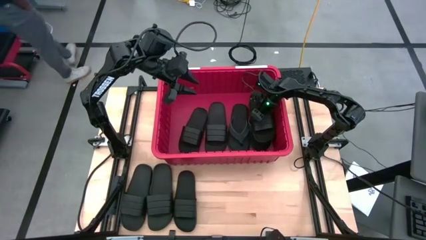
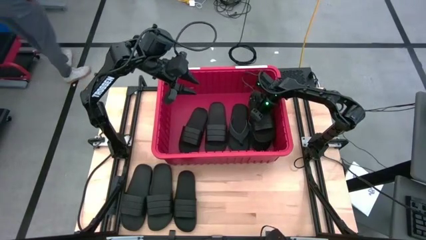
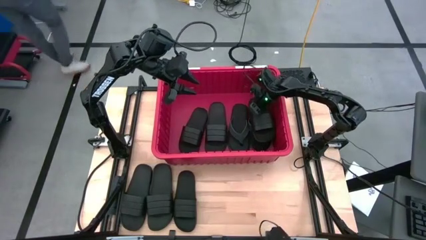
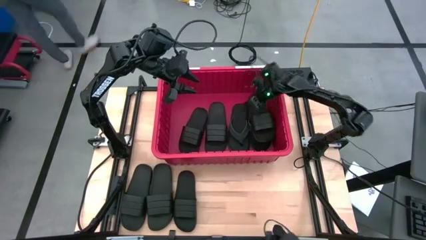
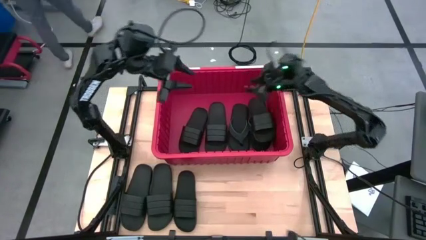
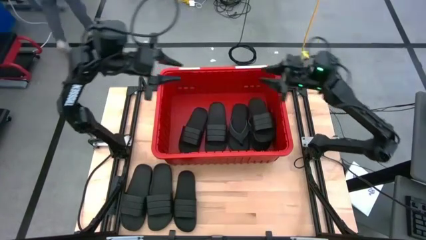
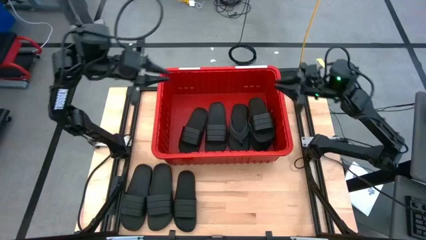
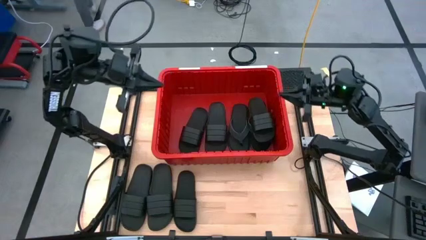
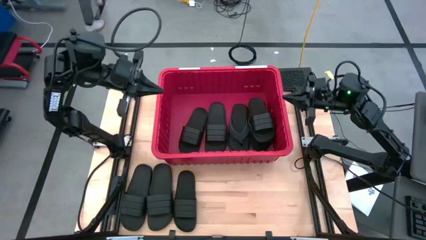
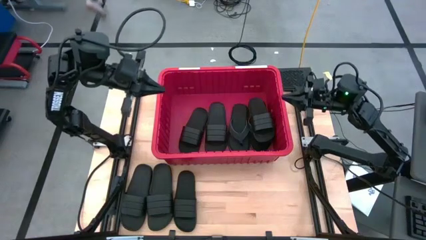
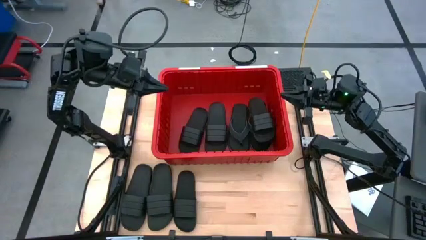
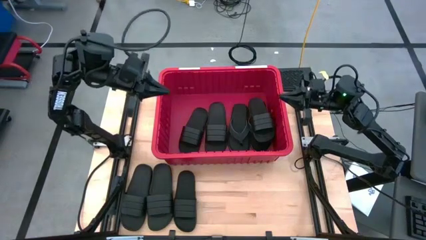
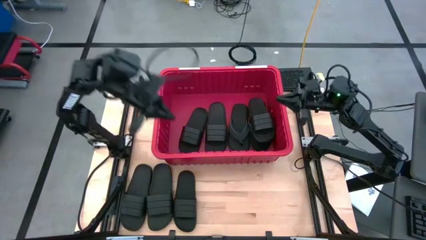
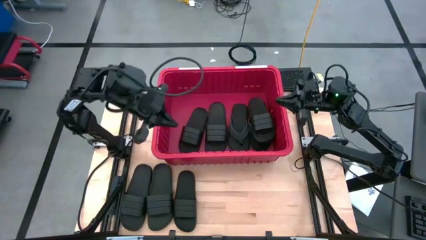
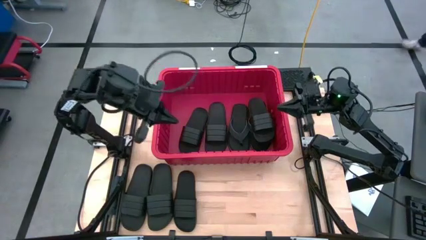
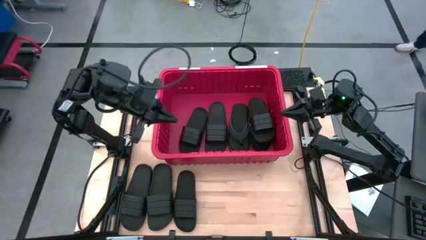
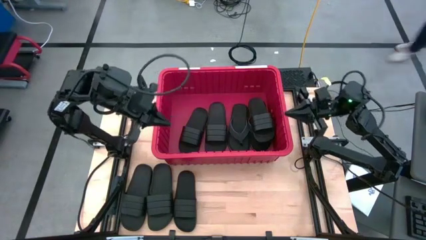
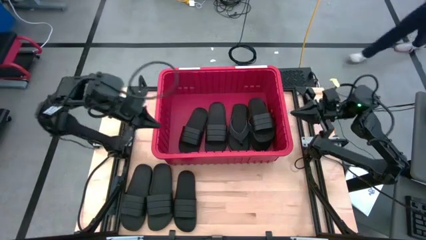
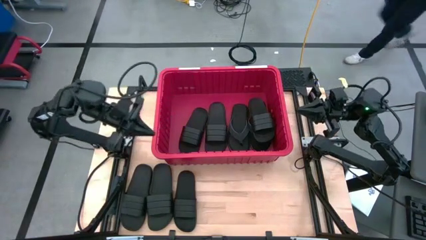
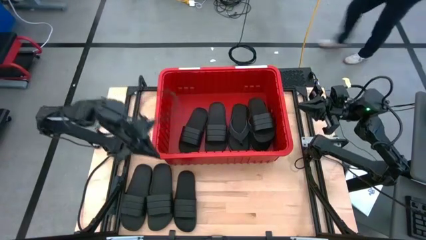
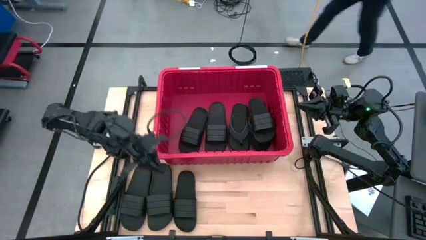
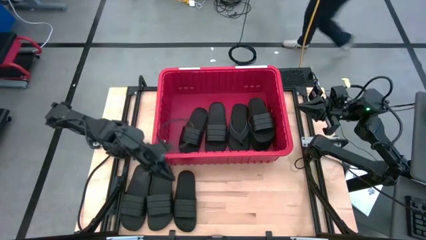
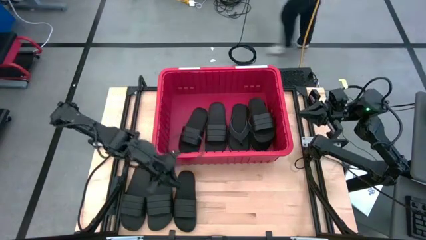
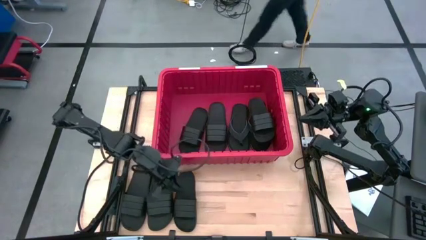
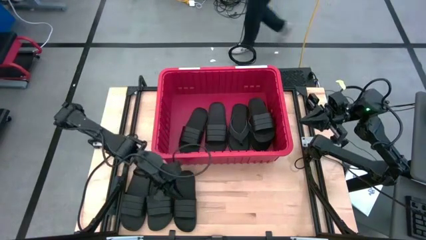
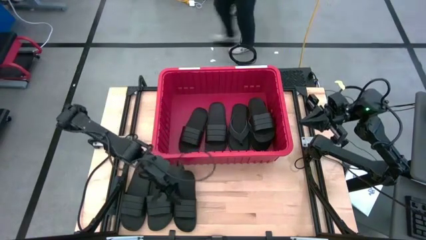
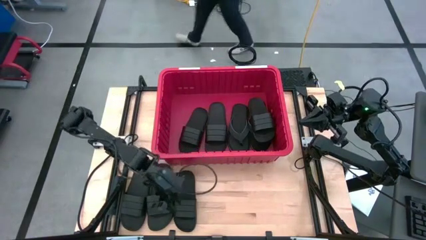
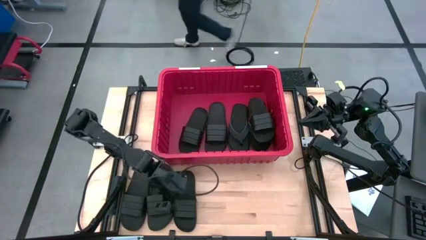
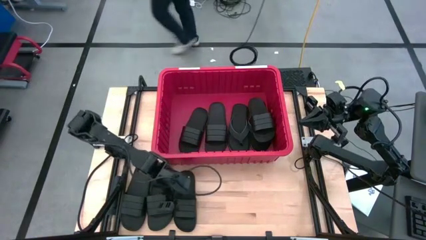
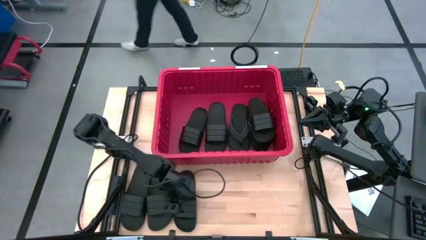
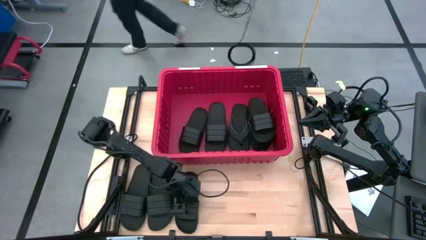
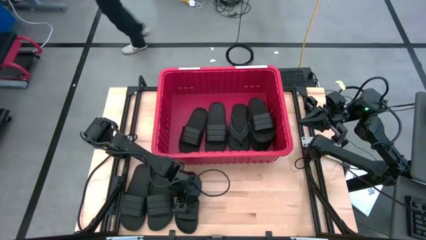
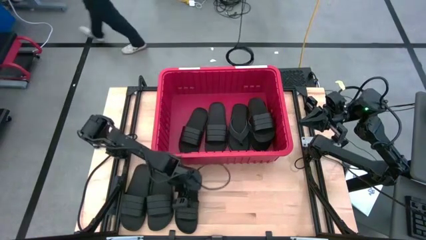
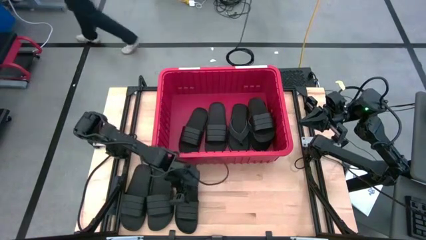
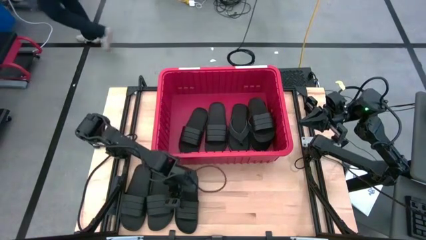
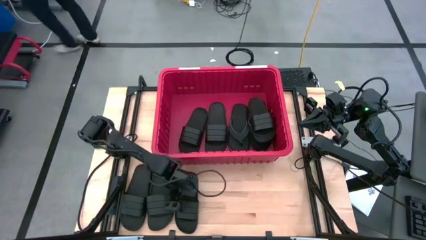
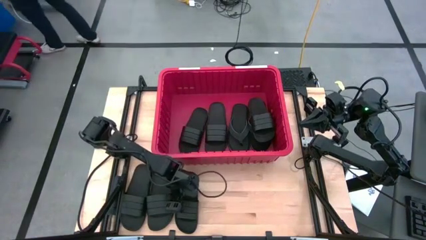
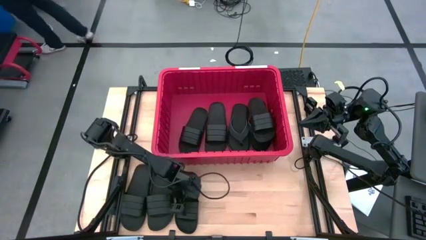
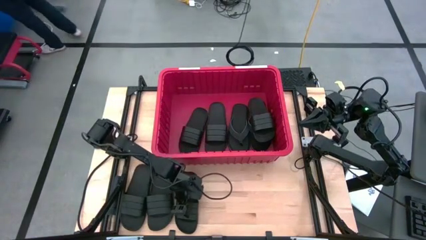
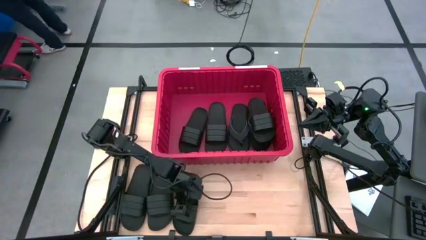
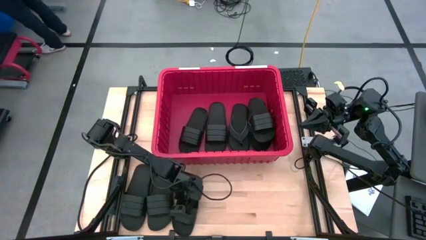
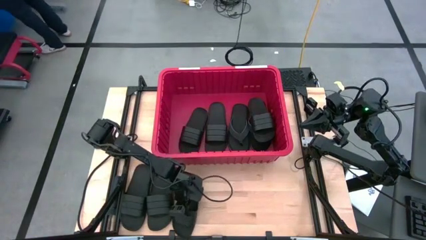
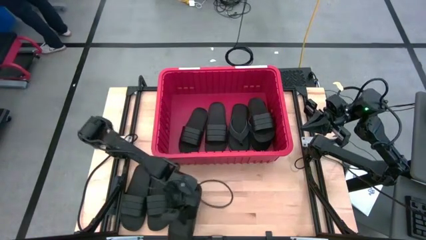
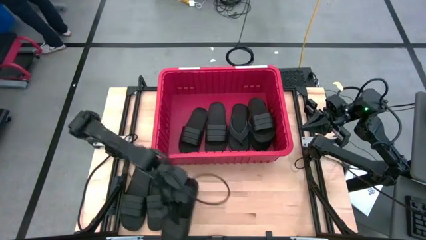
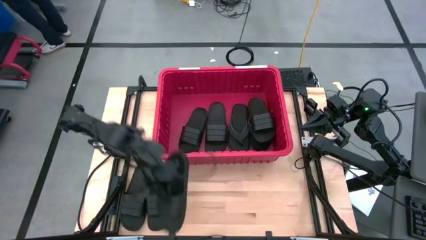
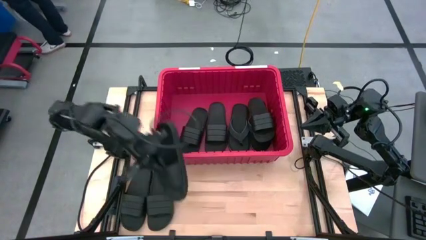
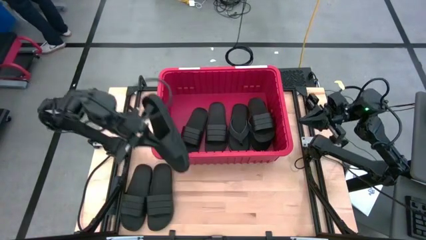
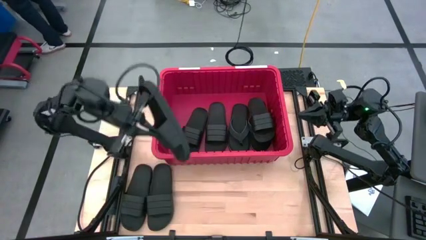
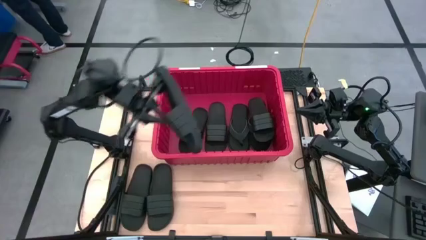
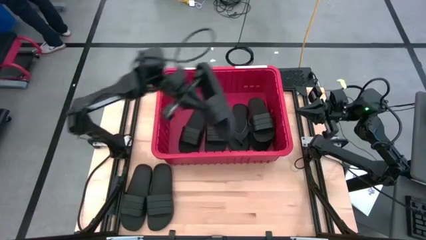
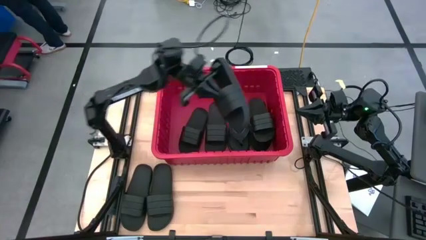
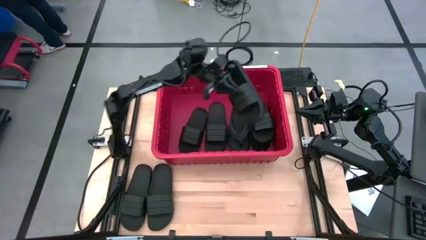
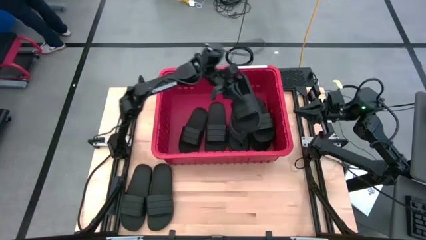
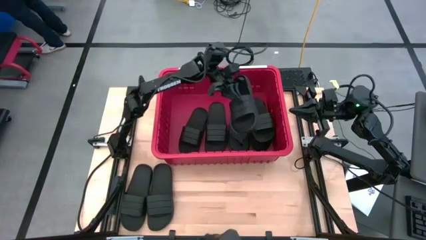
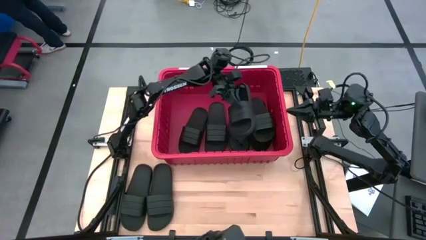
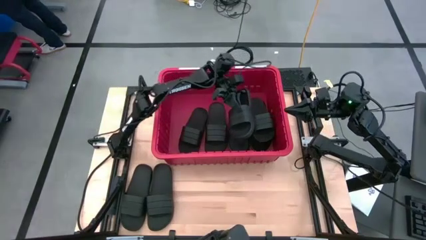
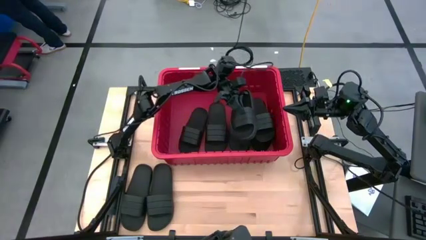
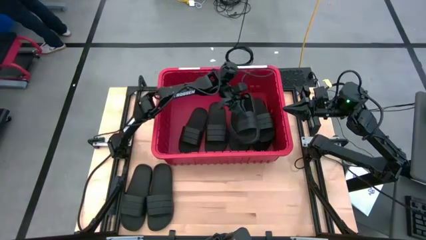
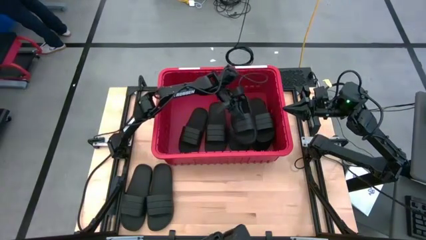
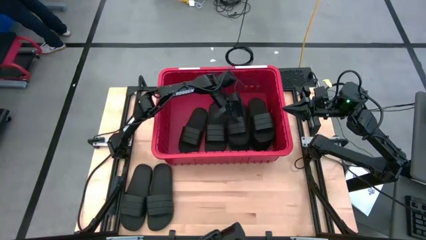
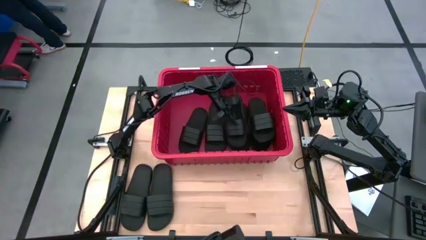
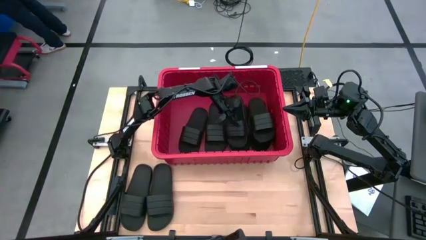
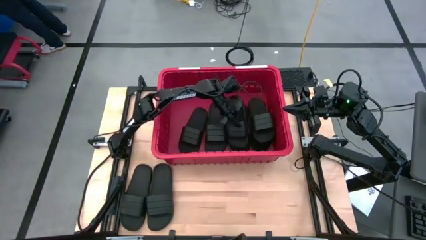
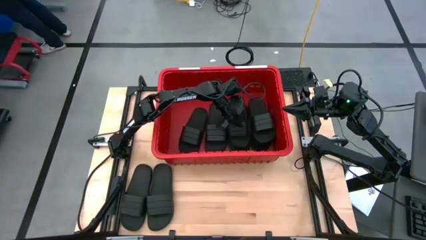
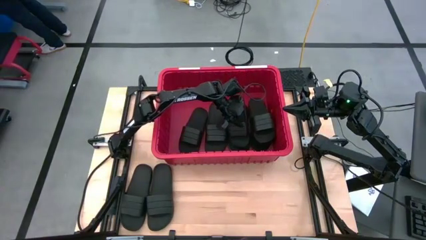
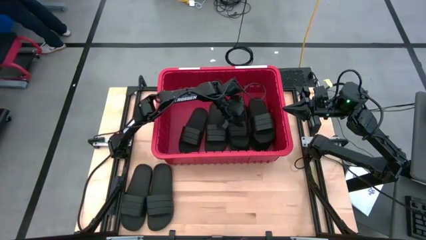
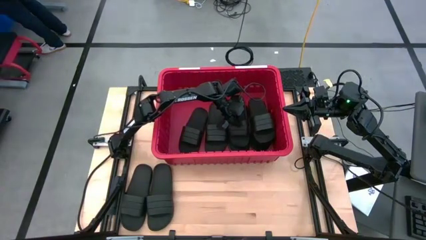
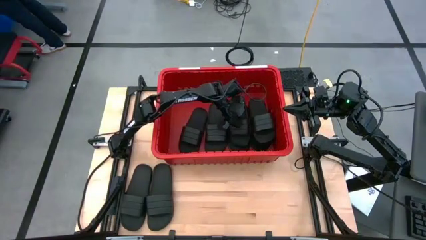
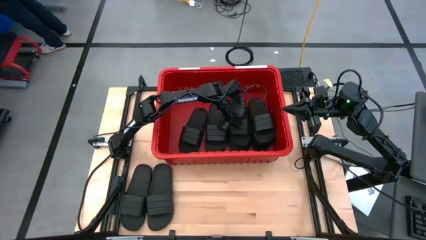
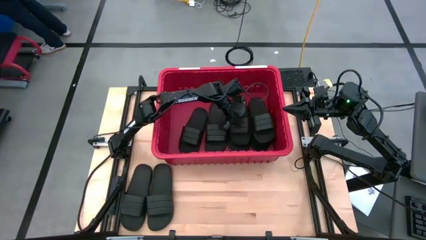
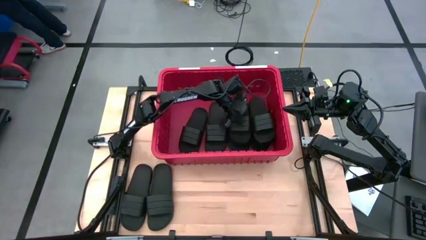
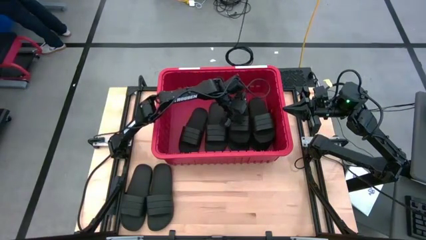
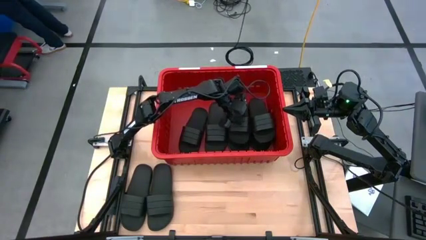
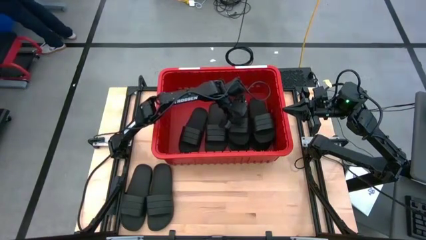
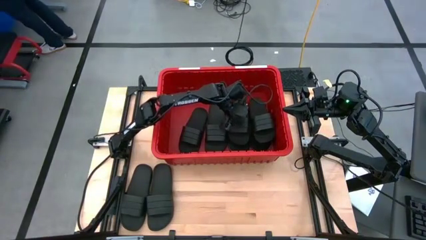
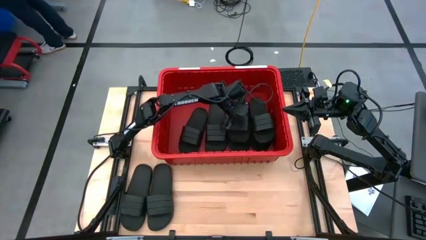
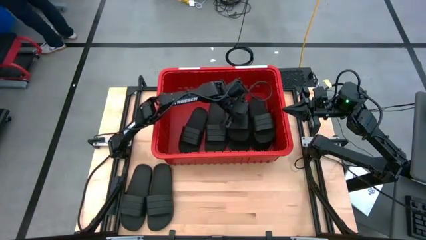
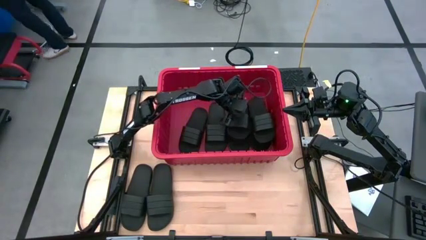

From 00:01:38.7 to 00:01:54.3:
Task: Pick and place slides into bin
Put the black slide into the red bin

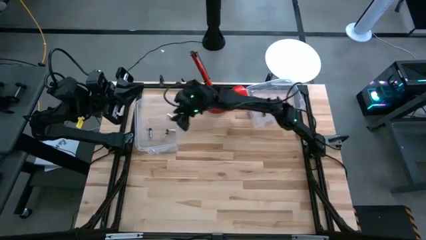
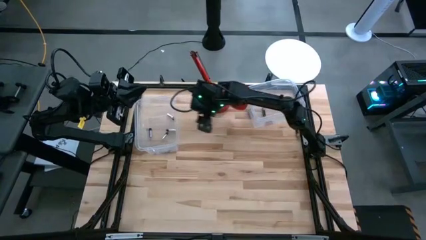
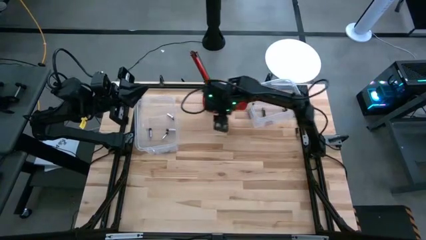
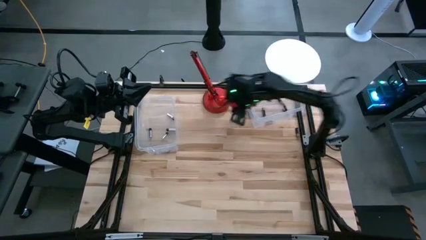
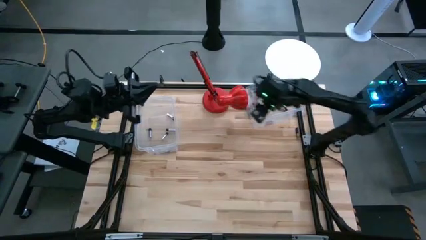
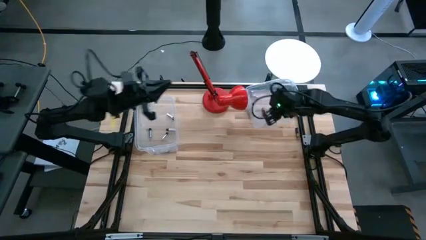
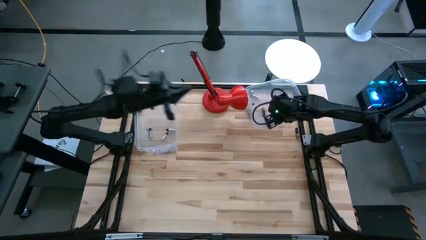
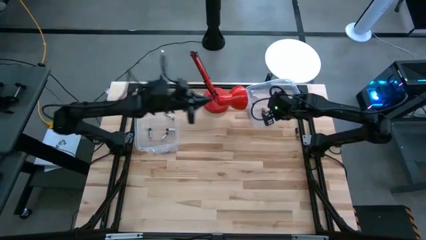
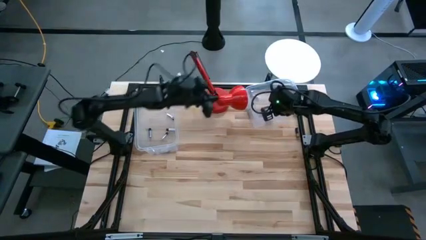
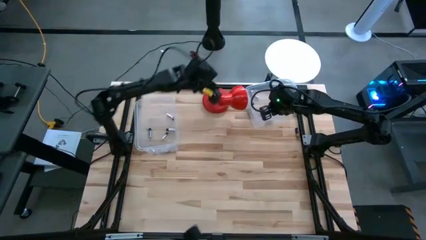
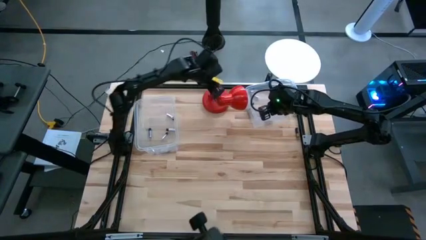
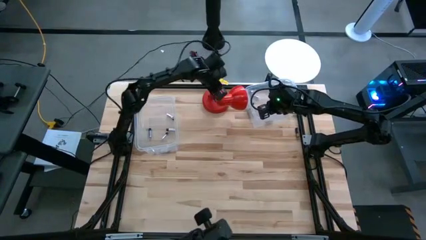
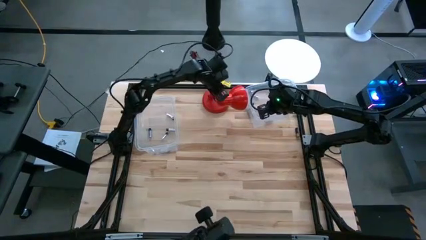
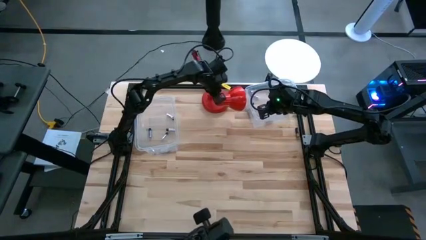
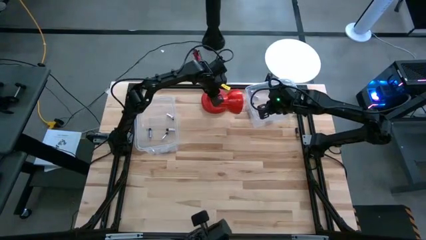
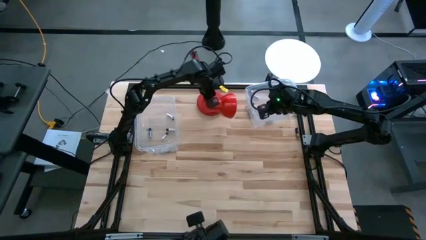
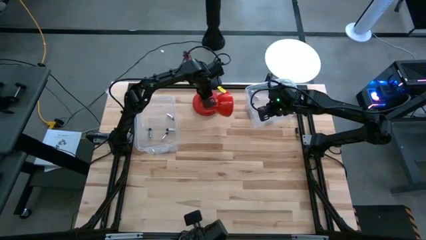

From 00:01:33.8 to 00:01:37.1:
Task: Sort batteries
Adjust the red lamp
